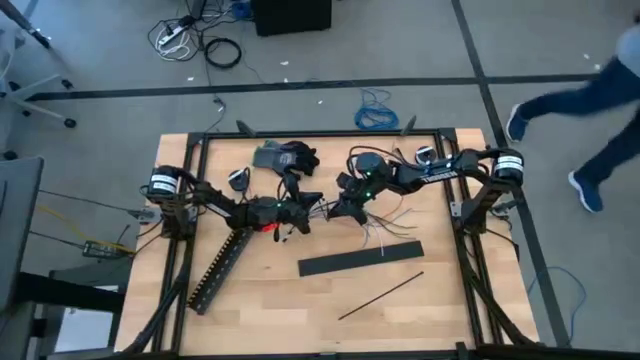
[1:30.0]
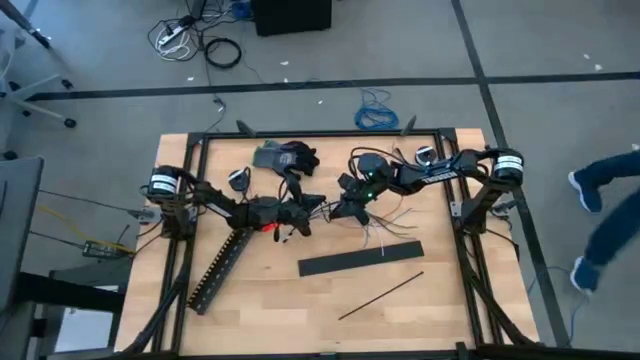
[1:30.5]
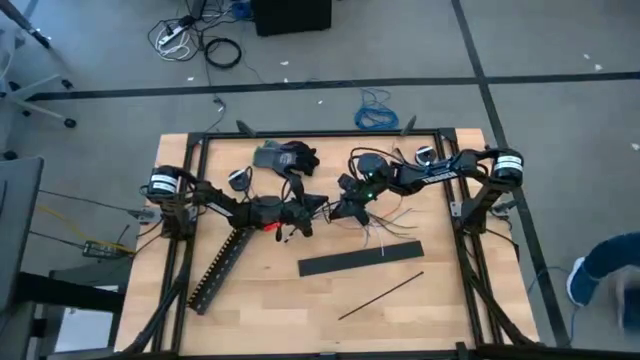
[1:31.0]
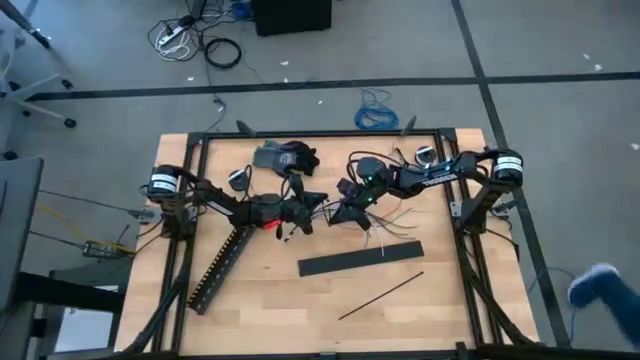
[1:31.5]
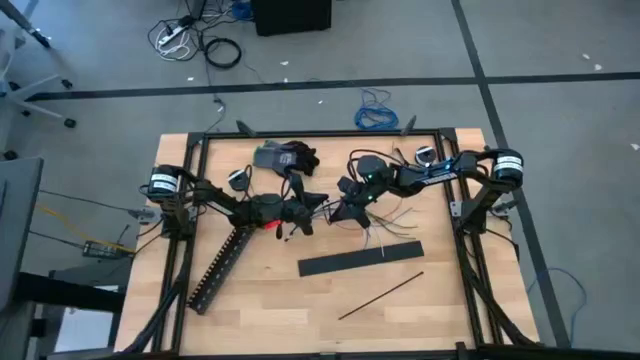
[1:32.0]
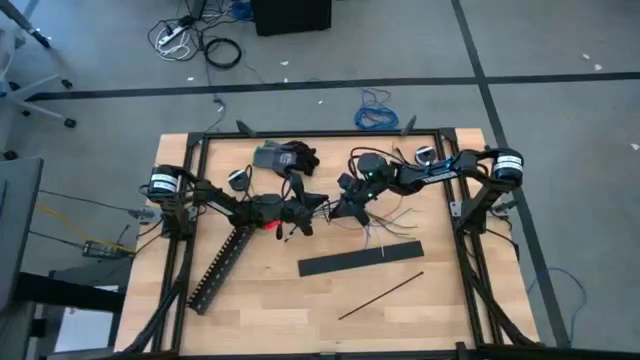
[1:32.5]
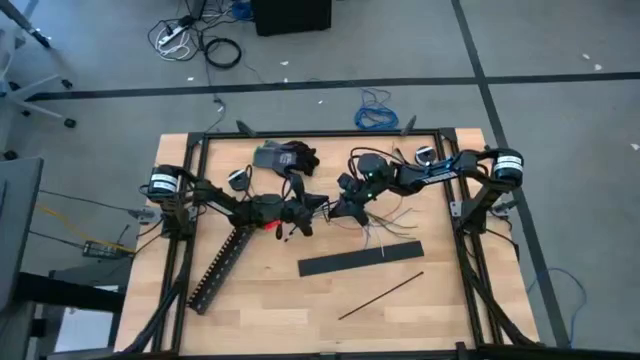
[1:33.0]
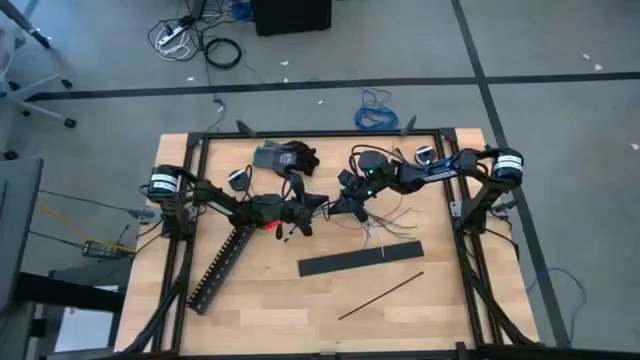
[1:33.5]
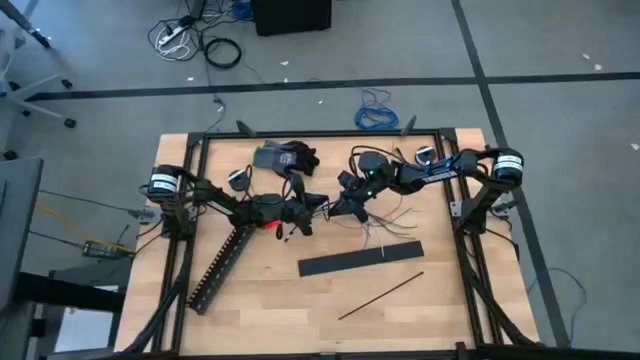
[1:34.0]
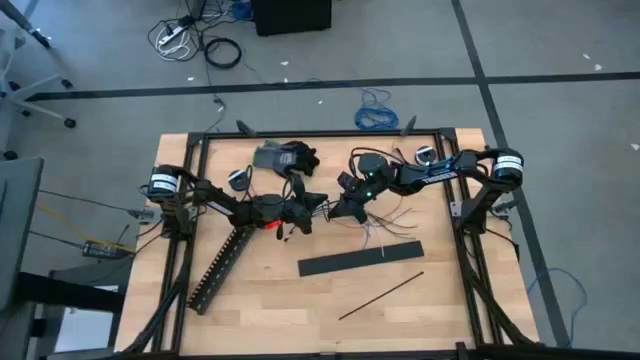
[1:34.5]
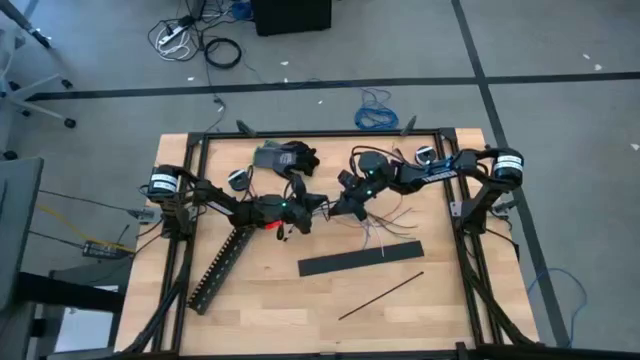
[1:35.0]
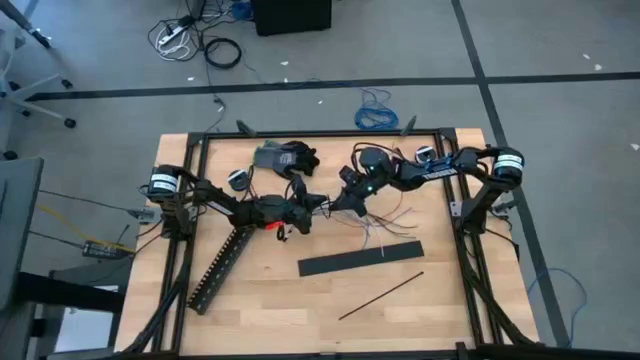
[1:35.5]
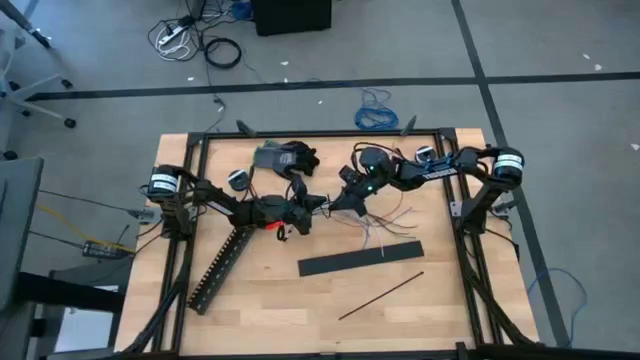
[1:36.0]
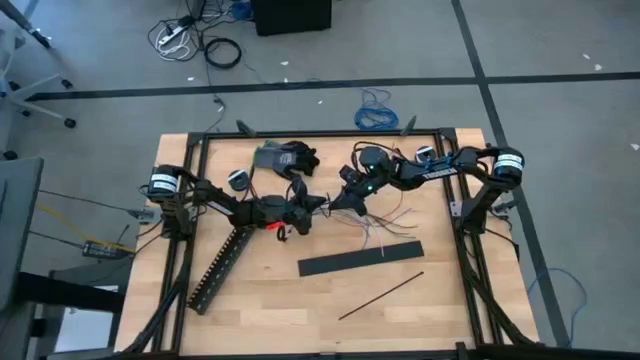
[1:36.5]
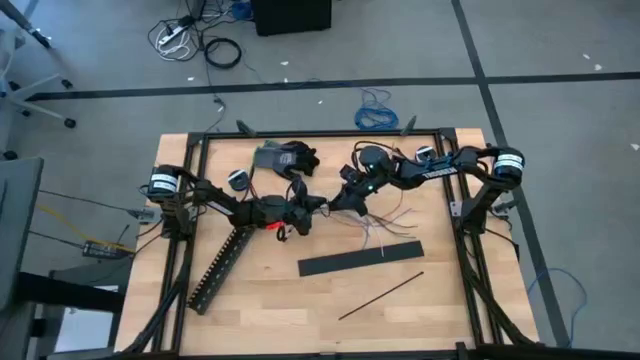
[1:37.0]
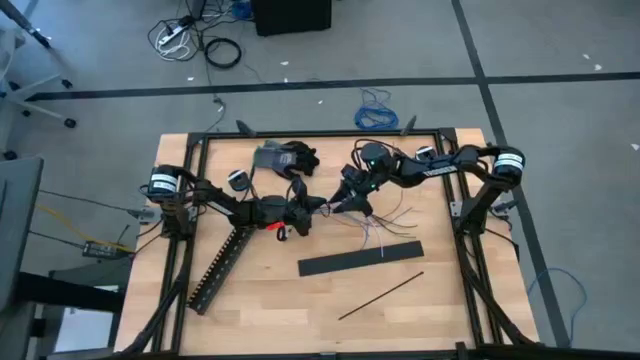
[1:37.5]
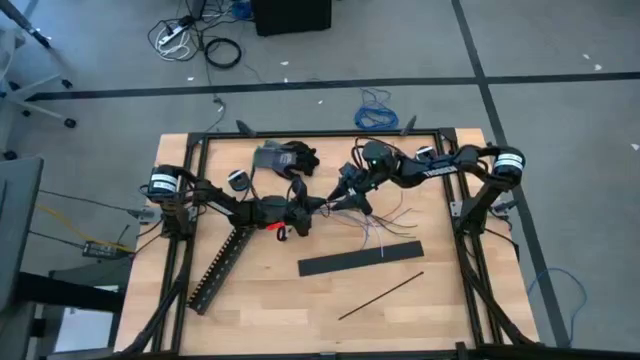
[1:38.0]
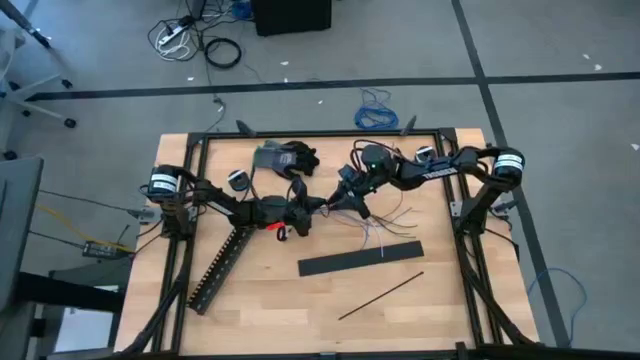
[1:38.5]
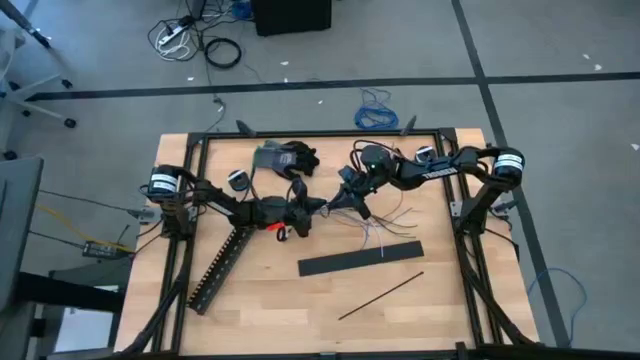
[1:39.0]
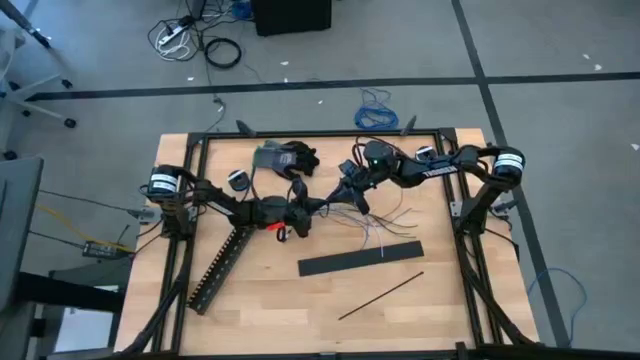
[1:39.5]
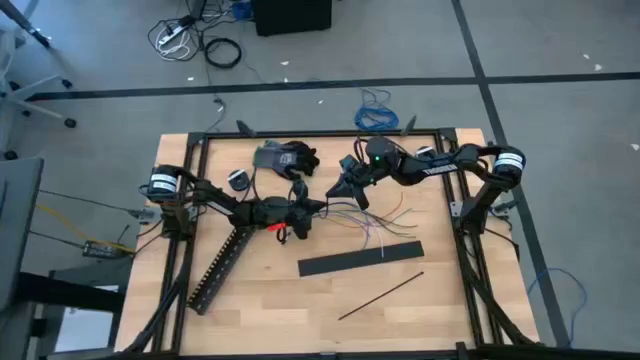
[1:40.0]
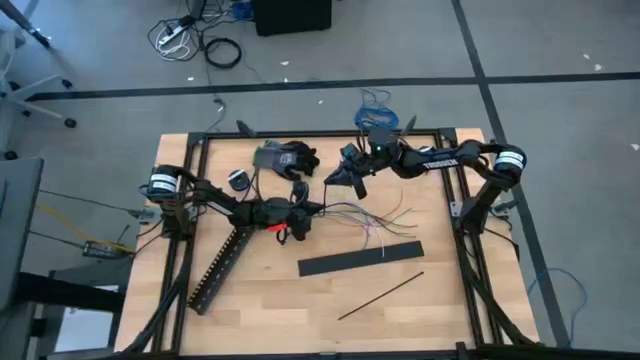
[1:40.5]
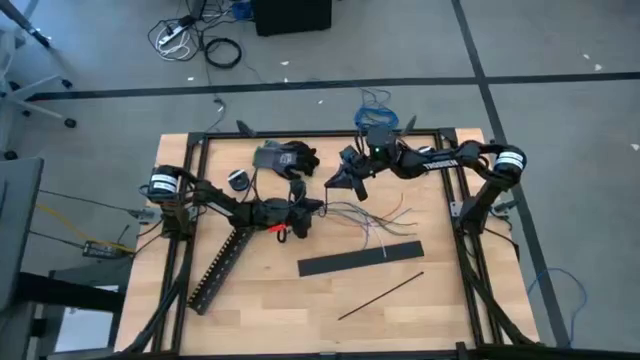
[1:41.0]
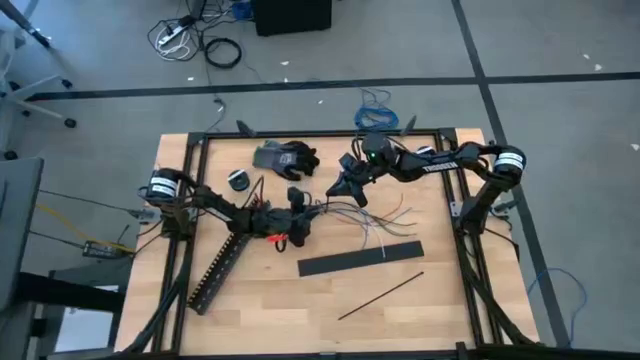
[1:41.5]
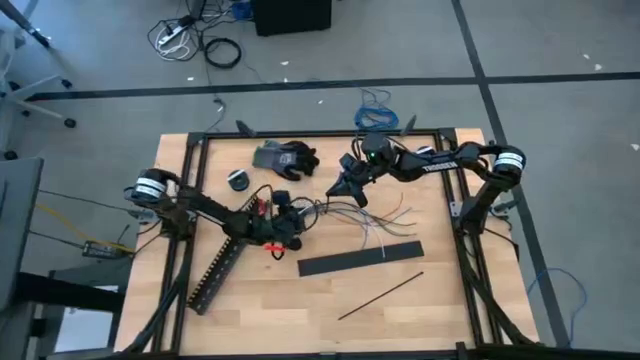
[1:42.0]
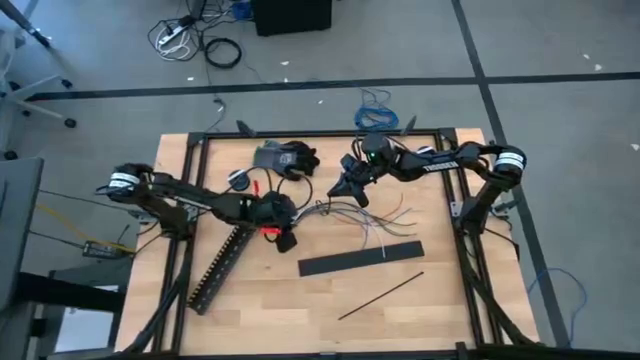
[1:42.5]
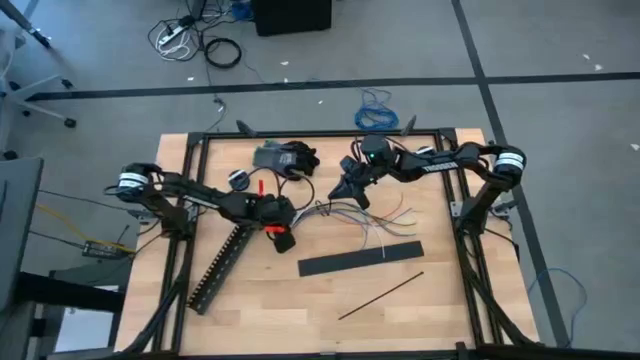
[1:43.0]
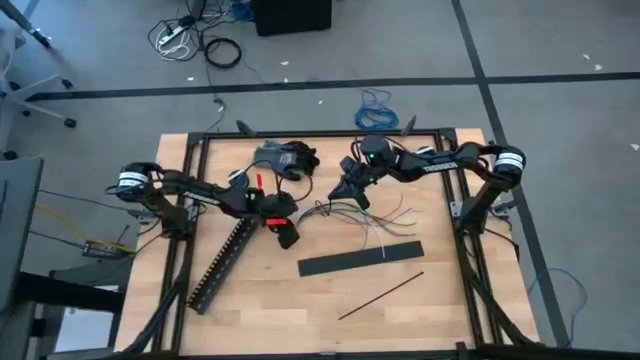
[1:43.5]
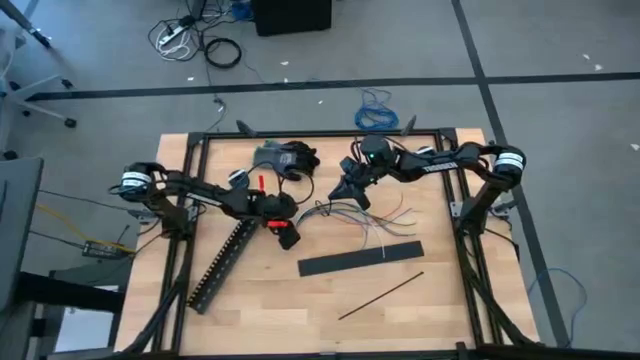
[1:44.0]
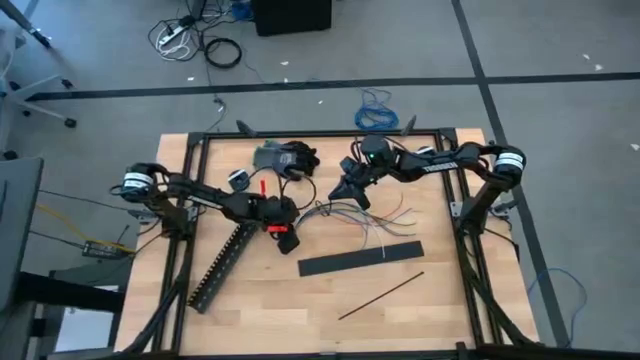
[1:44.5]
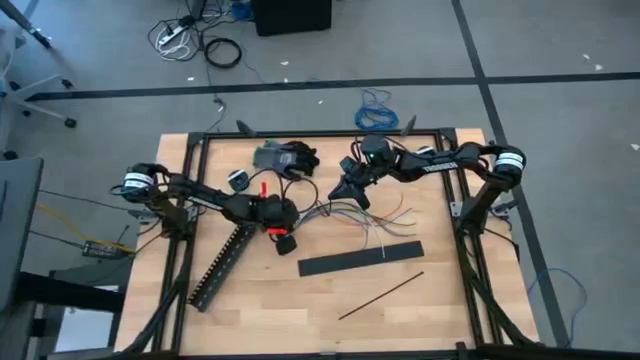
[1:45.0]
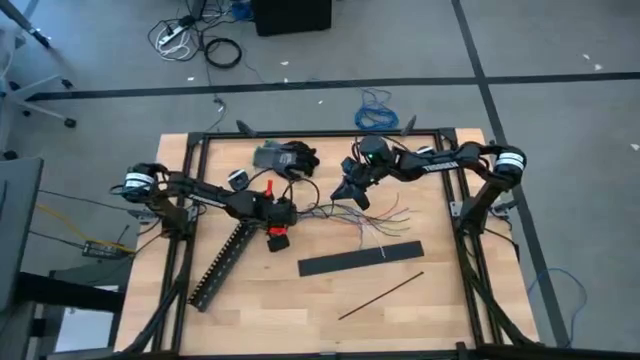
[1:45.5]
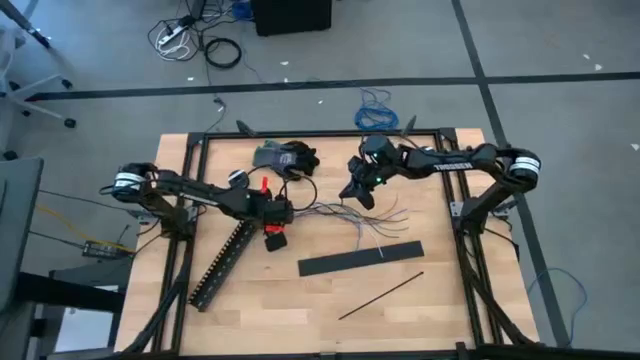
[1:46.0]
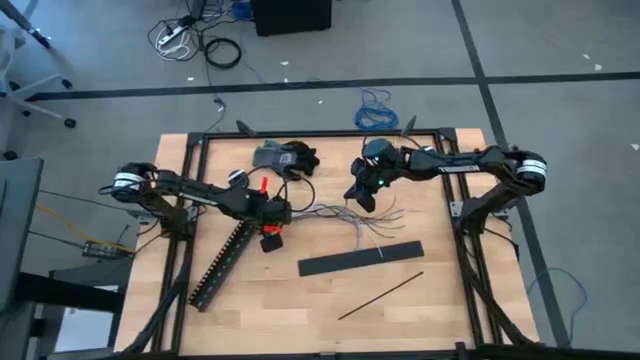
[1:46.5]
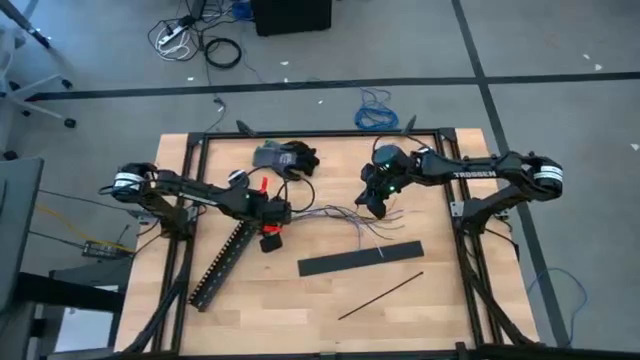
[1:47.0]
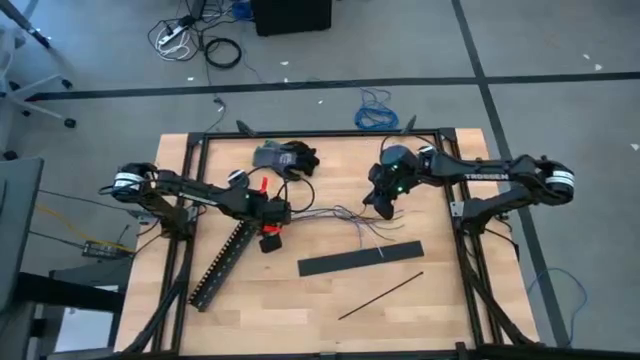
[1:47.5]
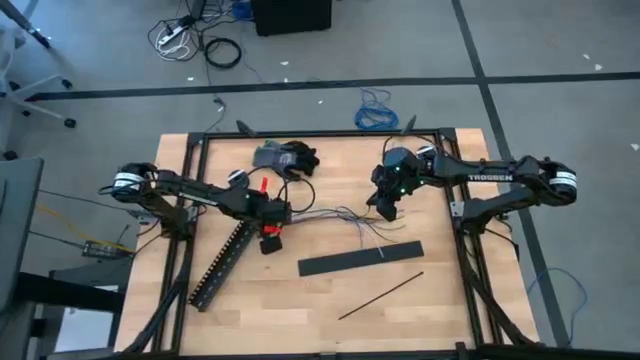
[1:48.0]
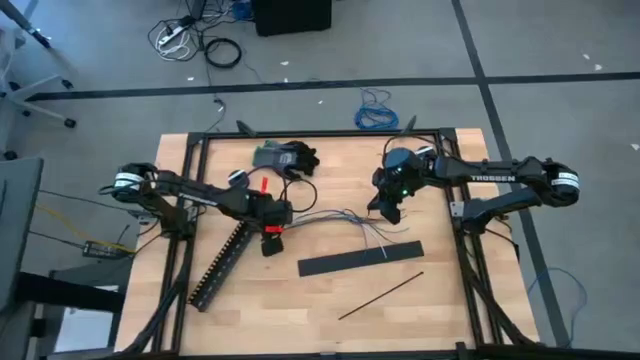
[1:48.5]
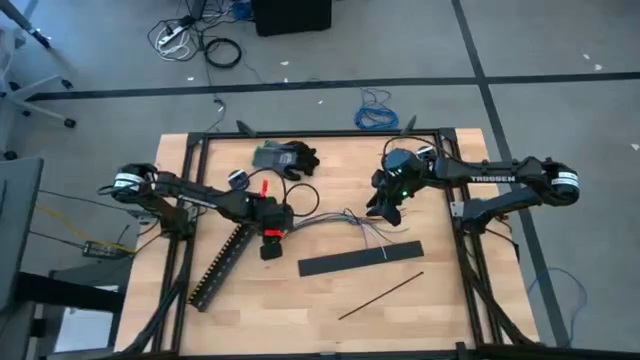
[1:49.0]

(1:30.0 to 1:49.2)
Task: Ziptie cables
Wrap the black zip tie on the cable wires
